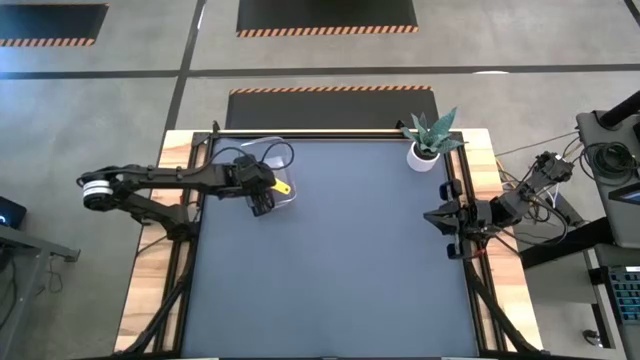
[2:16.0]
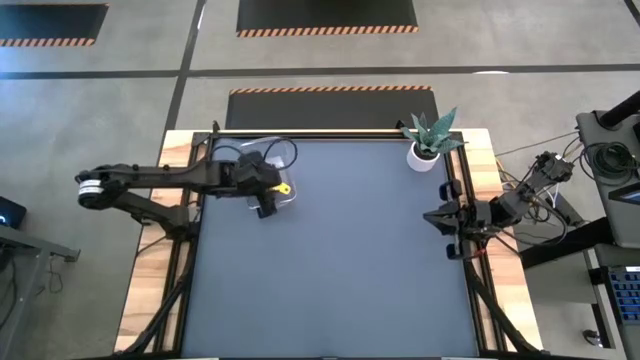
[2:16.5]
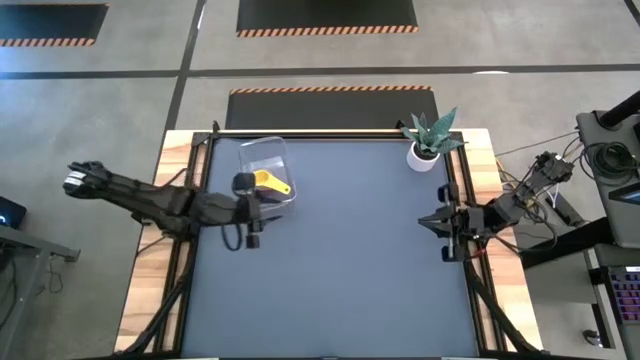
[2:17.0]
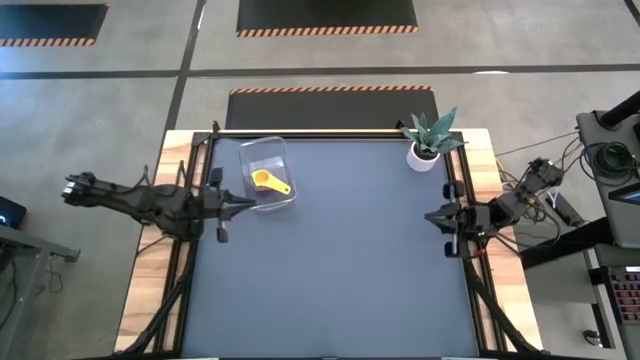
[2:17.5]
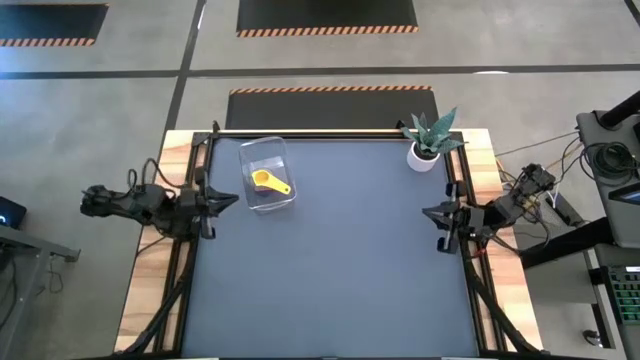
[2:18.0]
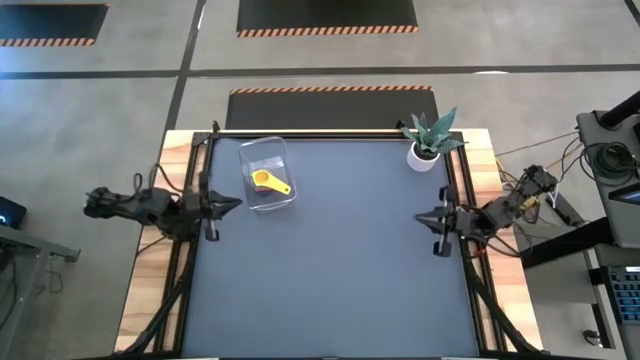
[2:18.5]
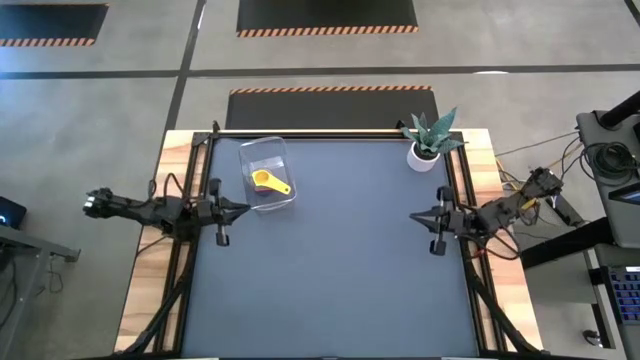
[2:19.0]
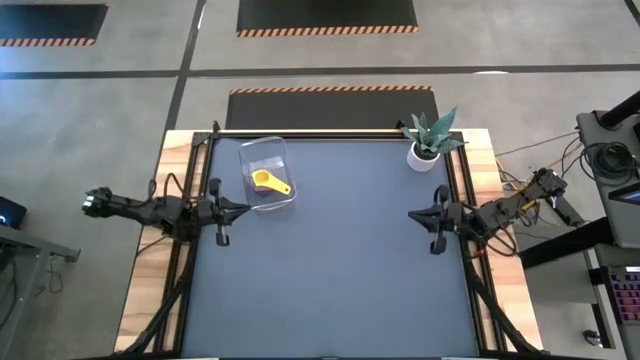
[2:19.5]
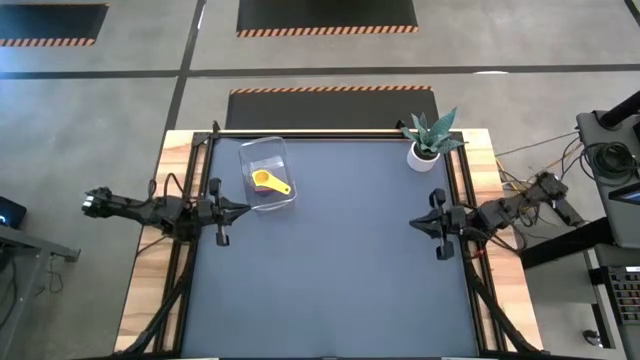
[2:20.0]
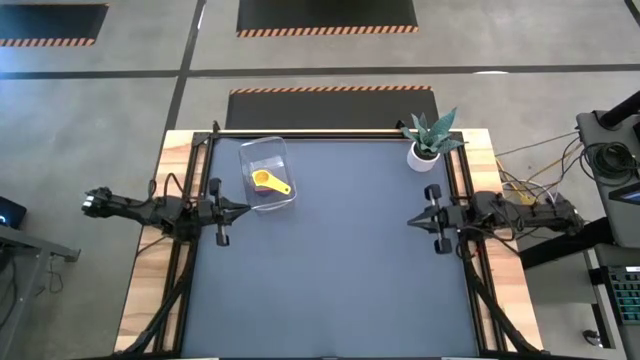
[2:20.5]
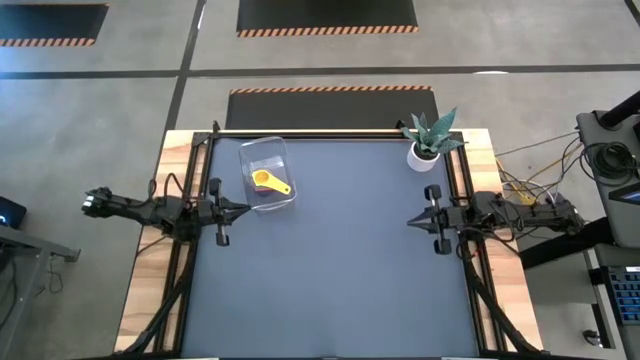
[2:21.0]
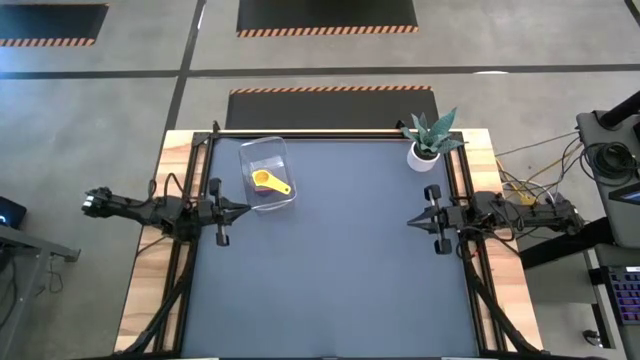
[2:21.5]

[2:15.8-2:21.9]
Task: Nest measuring cups in basket
Return to Home Position

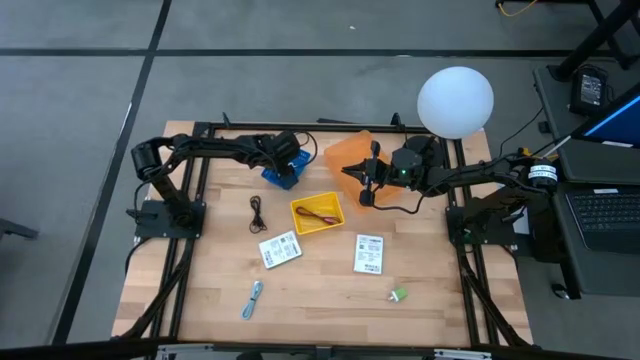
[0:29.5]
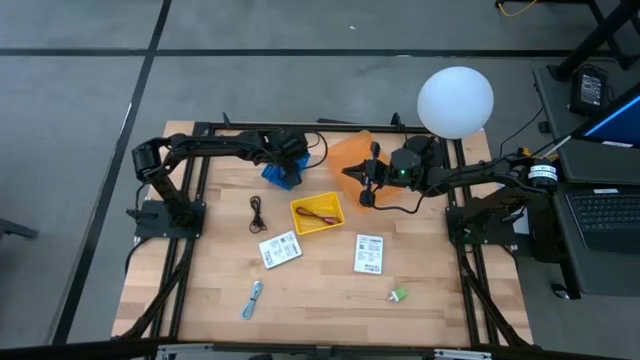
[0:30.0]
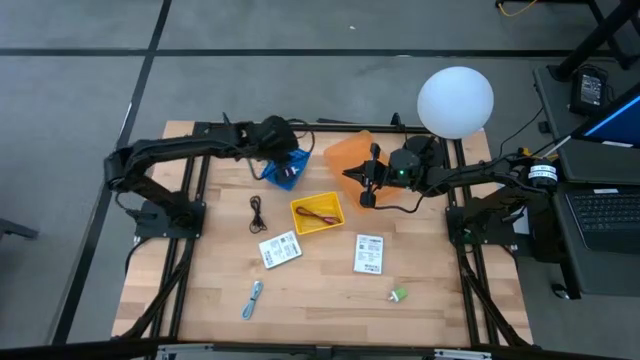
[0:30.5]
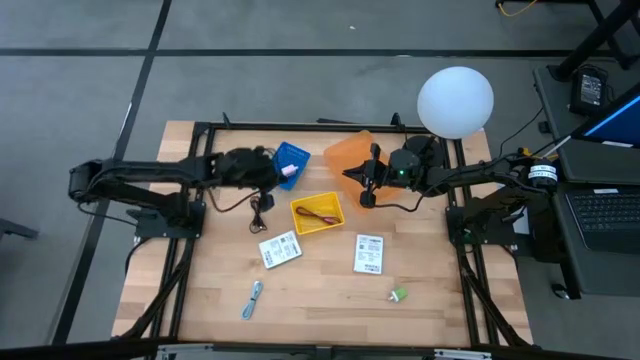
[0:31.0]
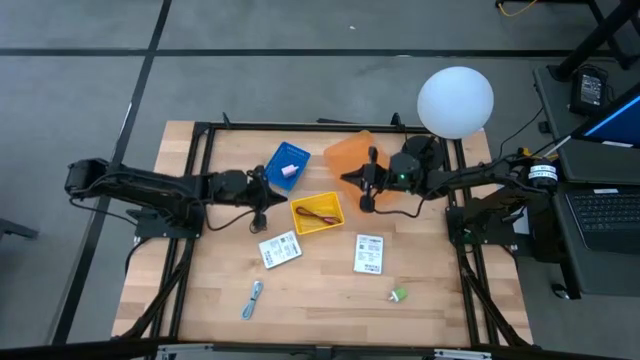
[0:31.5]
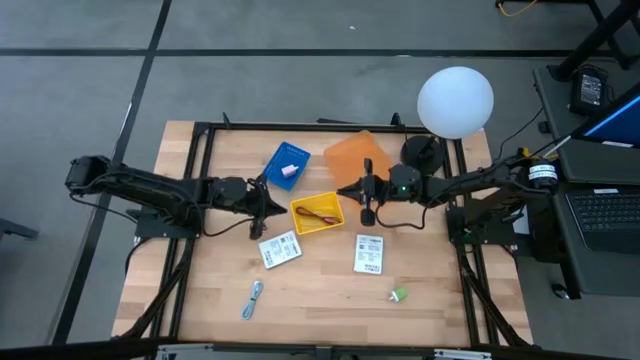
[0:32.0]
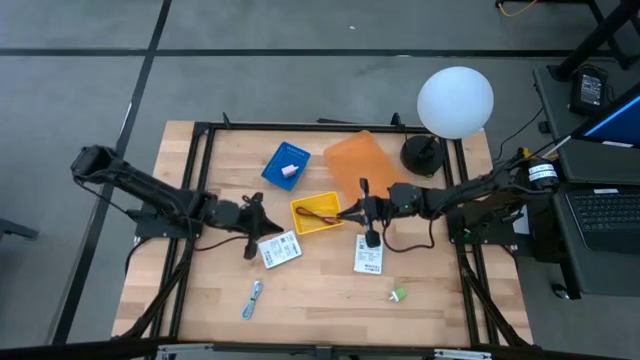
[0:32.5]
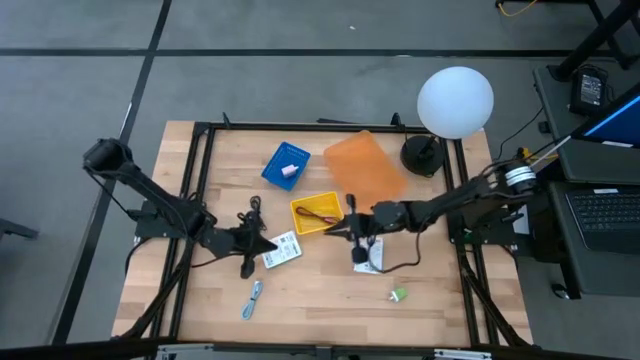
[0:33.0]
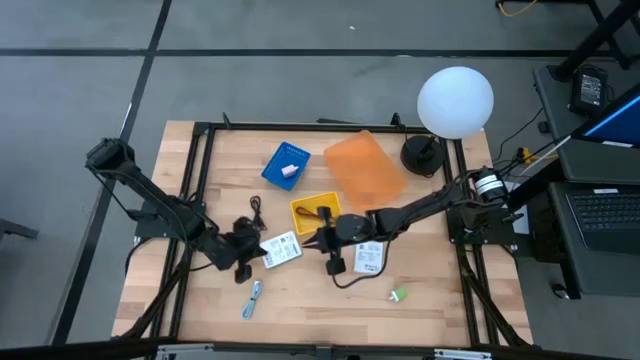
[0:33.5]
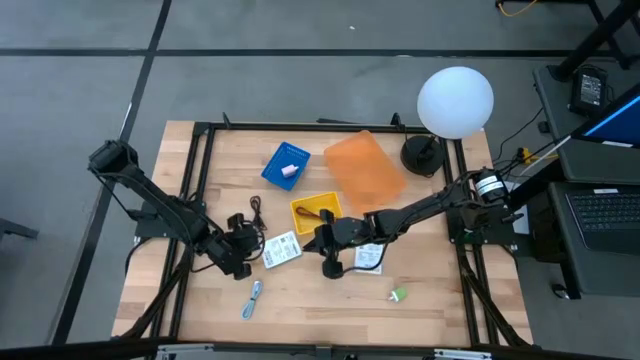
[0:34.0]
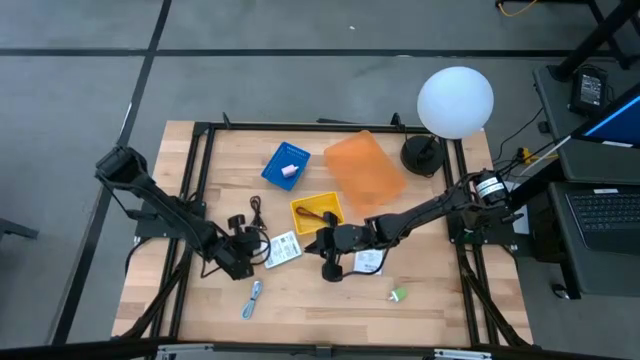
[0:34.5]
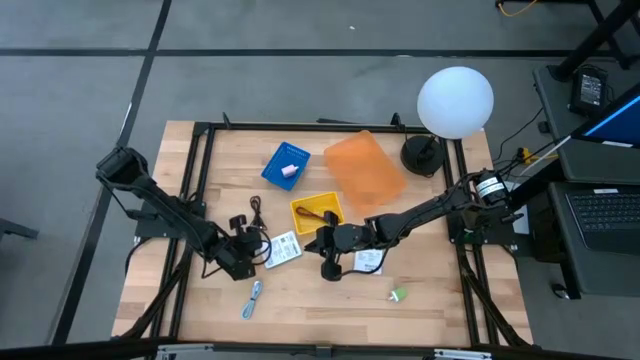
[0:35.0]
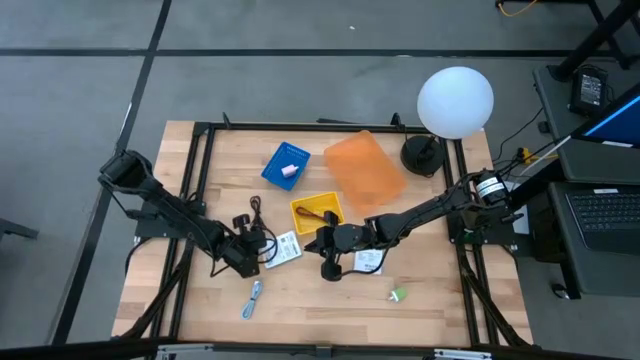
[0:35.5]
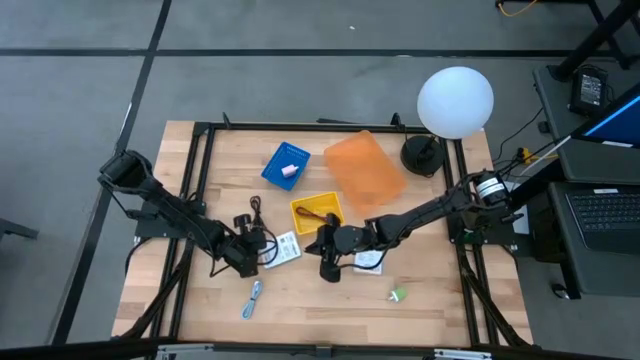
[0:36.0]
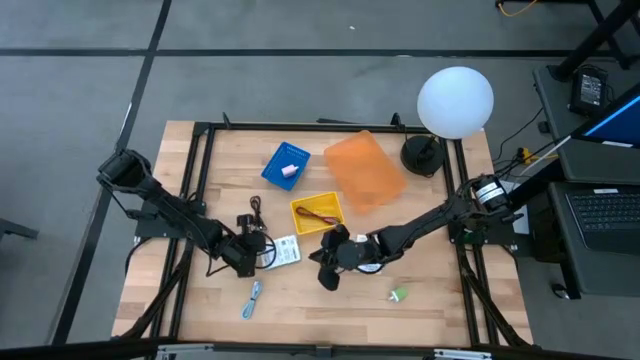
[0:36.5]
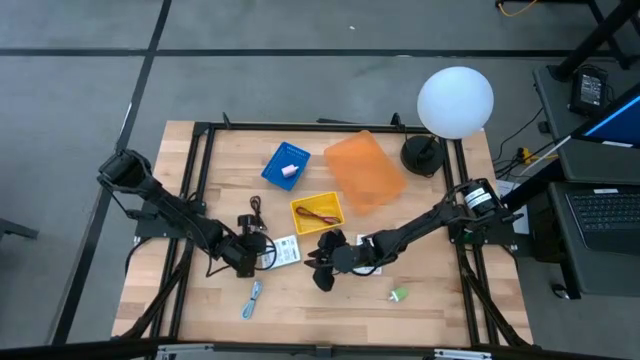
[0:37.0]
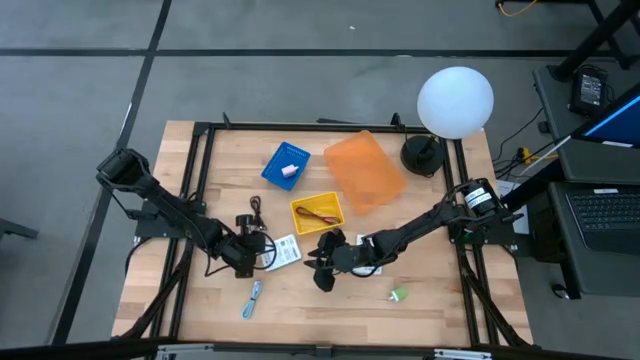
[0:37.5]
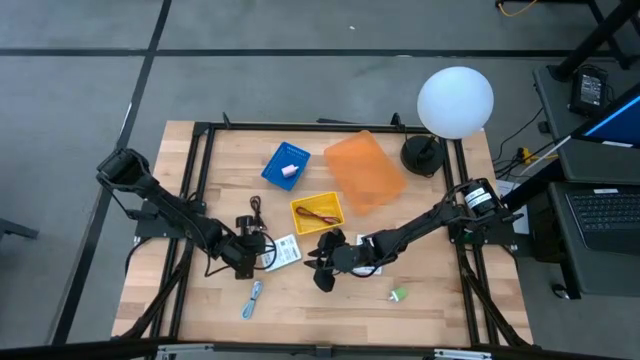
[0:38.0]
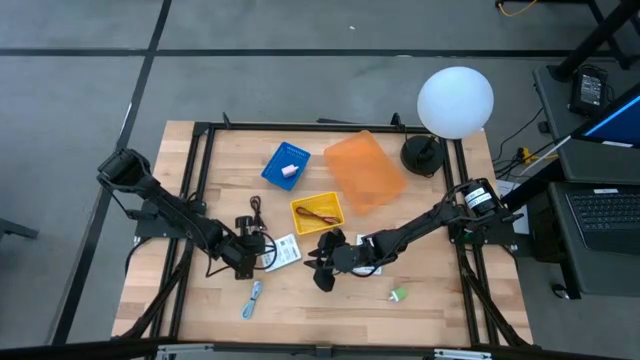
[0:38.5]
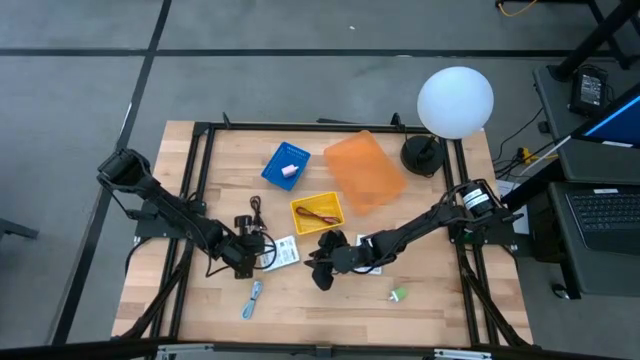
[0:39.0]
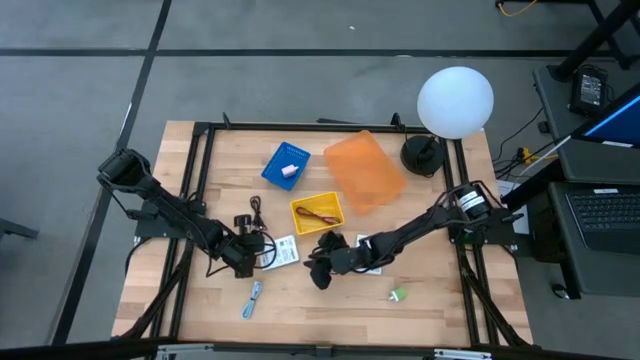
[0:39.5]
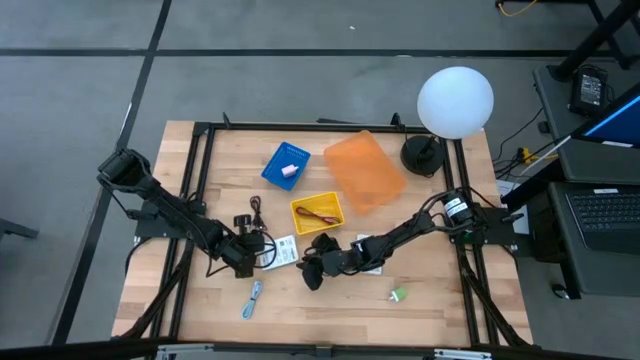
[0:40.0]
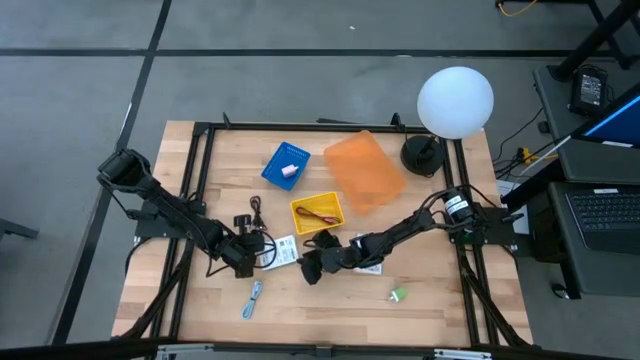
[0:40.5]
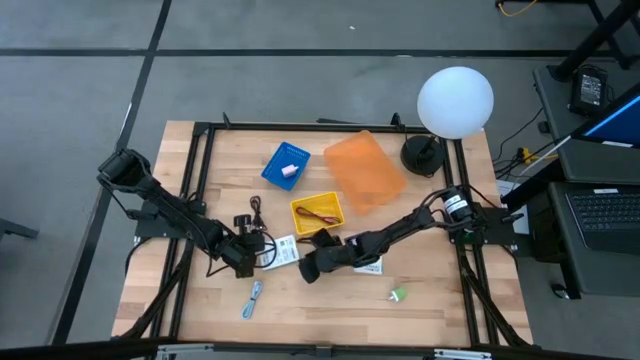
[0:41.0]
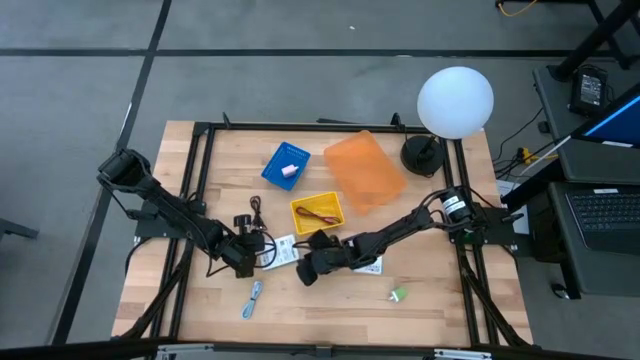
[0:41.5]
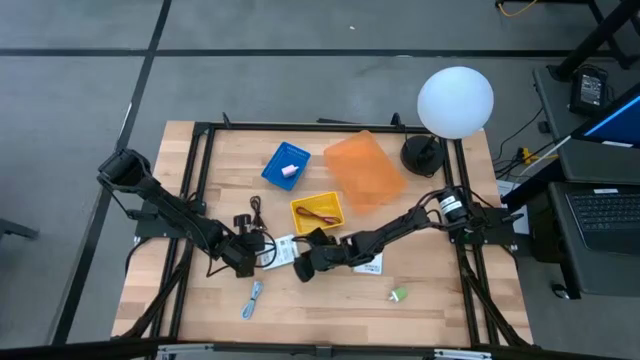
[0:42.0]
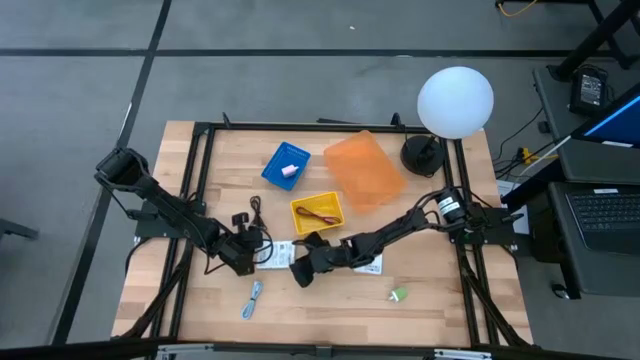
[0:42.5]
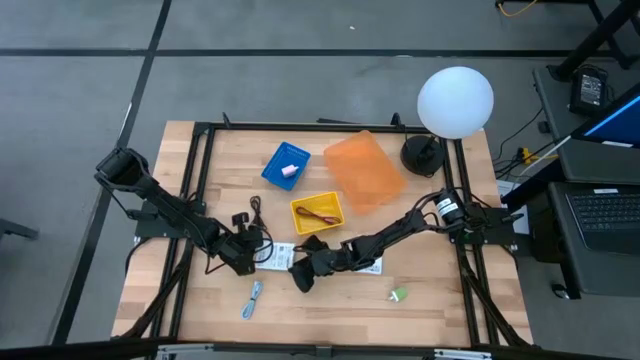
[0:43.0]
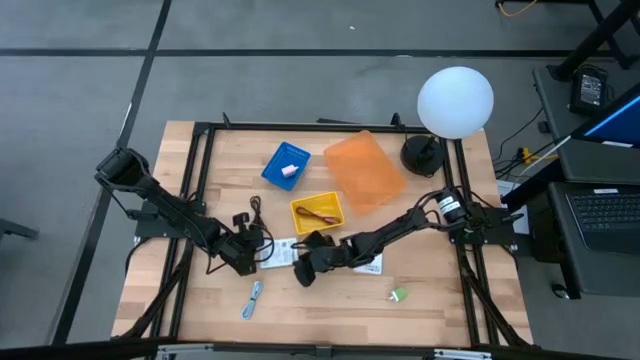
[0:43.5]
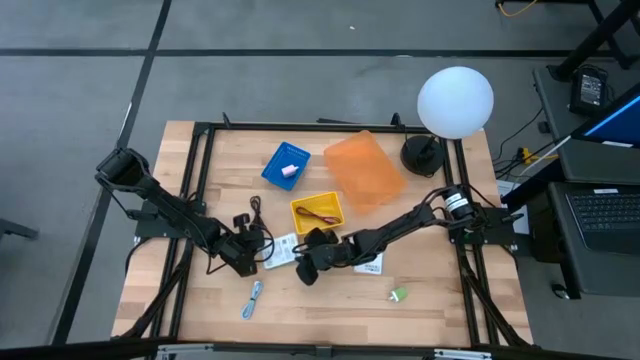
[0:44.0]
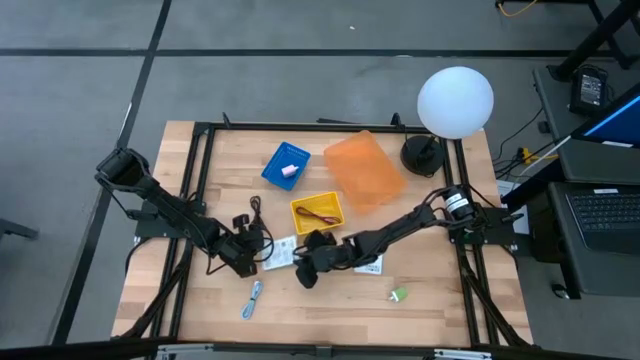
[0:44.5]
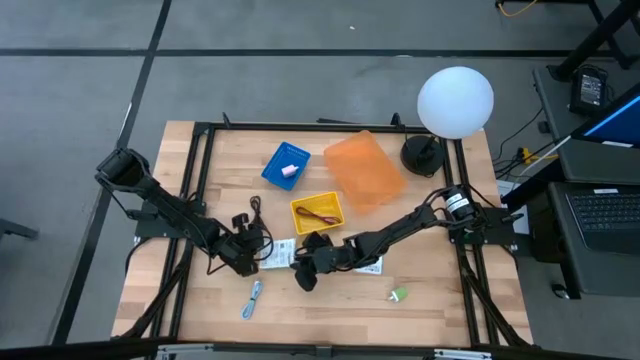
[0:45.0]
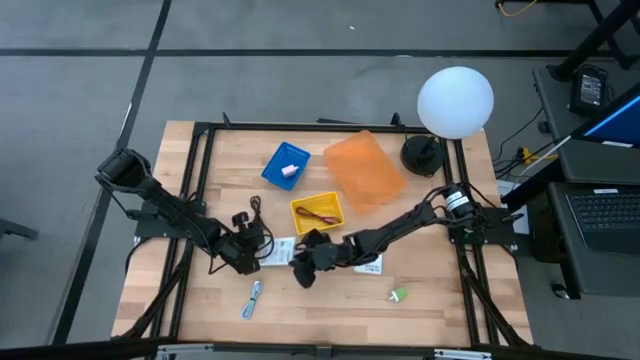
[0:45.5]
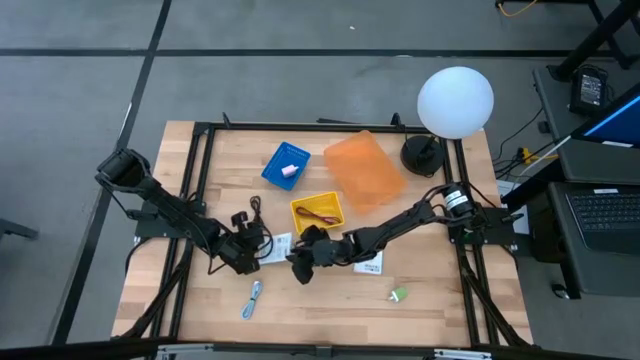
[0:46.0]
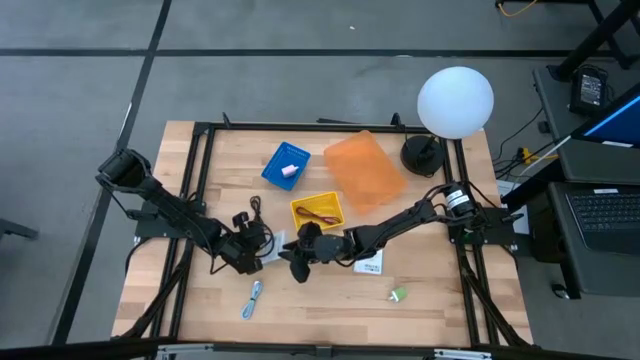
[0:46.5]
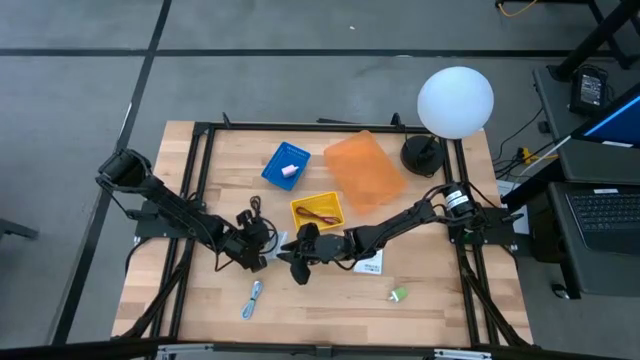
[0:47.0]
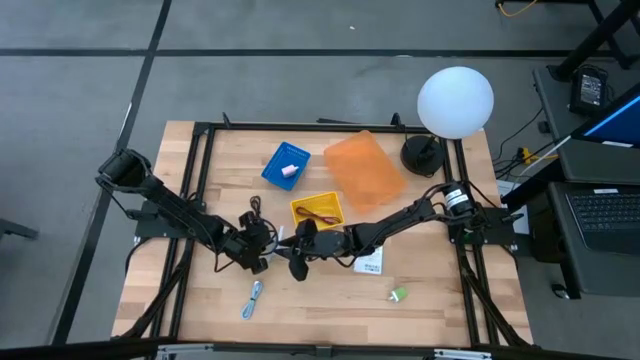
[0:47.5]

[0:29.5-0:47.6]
Task: Pick and place items into bin
Put the white card reader box into the orange bin
